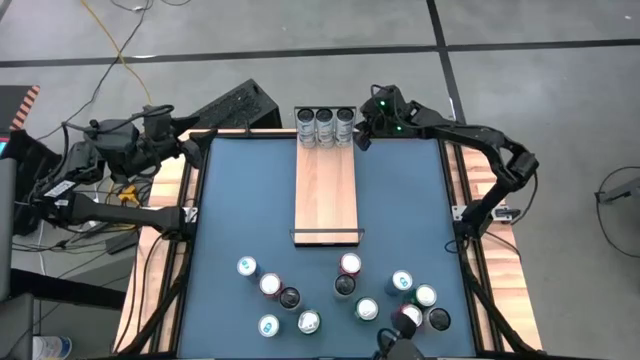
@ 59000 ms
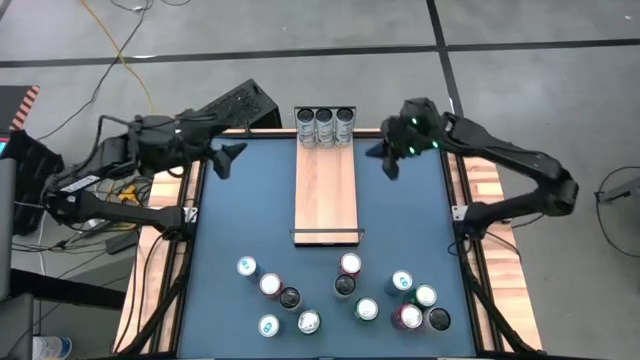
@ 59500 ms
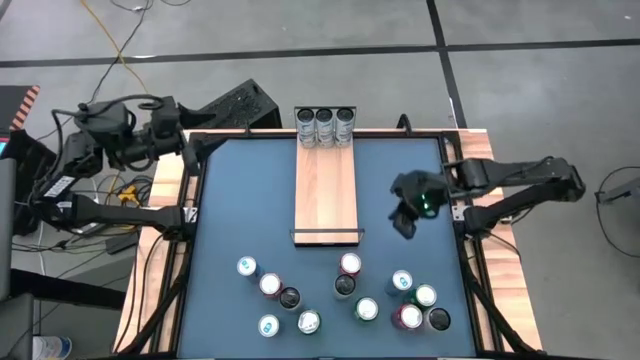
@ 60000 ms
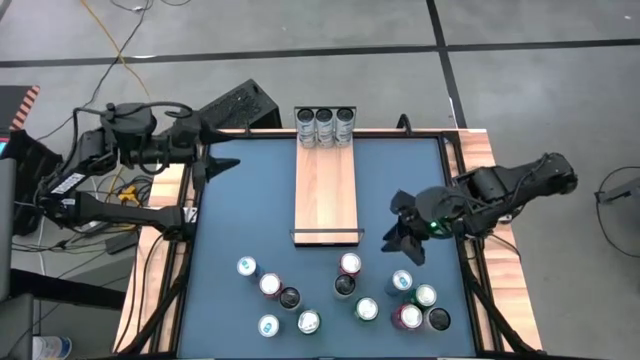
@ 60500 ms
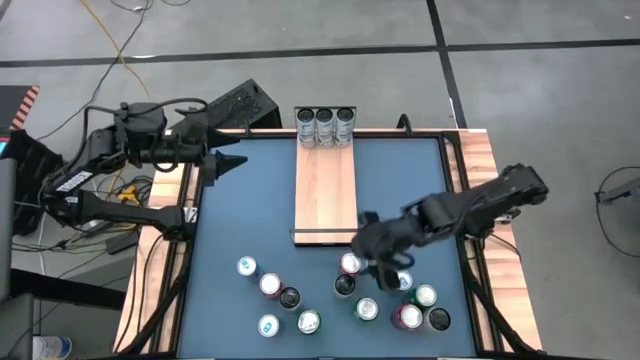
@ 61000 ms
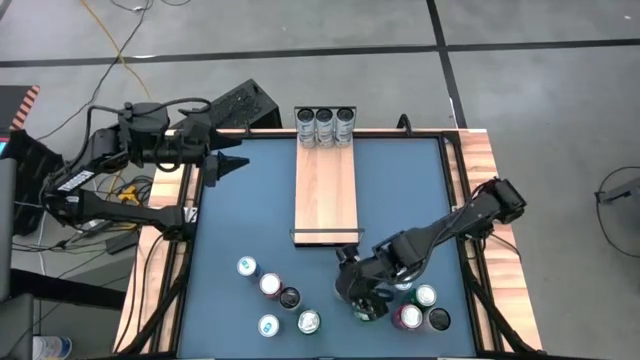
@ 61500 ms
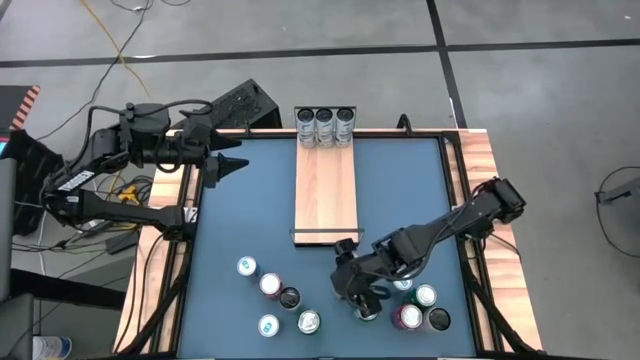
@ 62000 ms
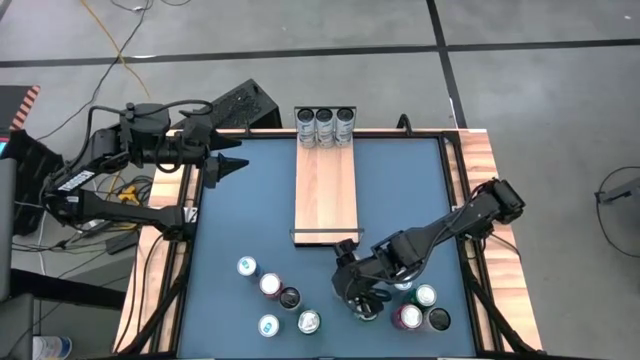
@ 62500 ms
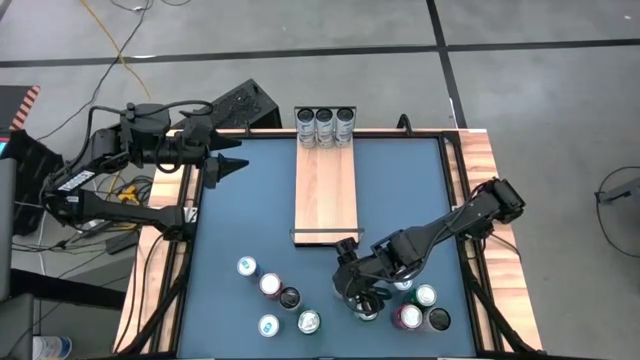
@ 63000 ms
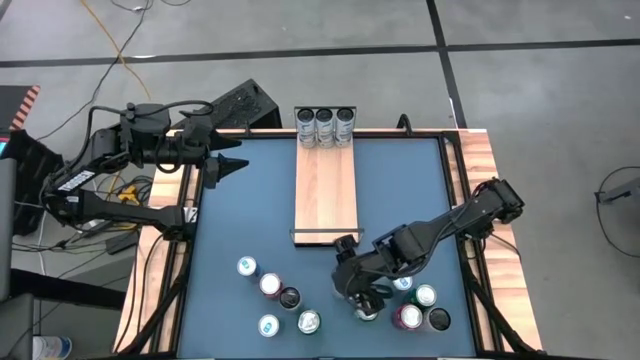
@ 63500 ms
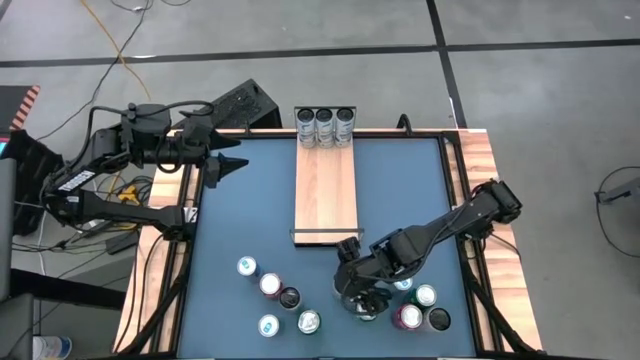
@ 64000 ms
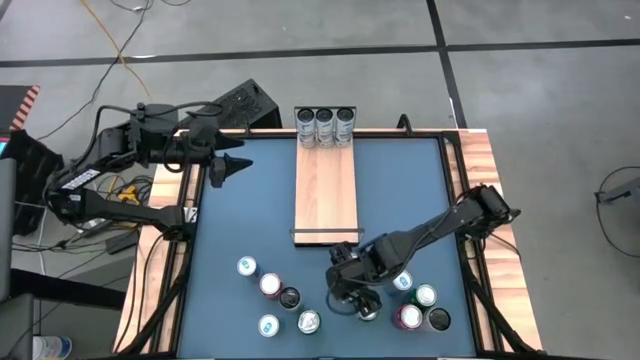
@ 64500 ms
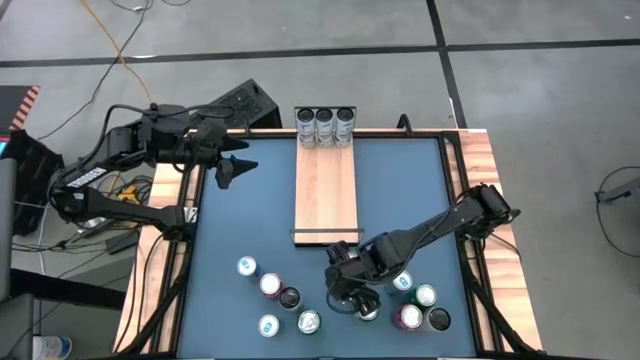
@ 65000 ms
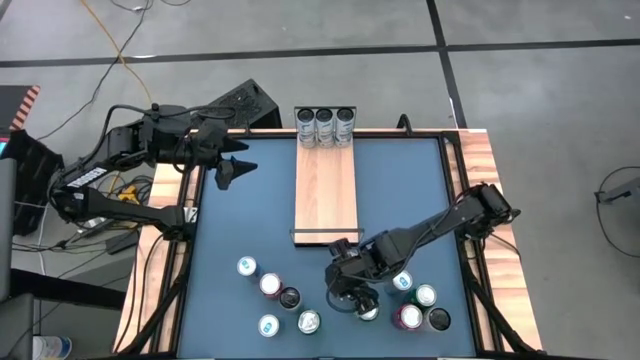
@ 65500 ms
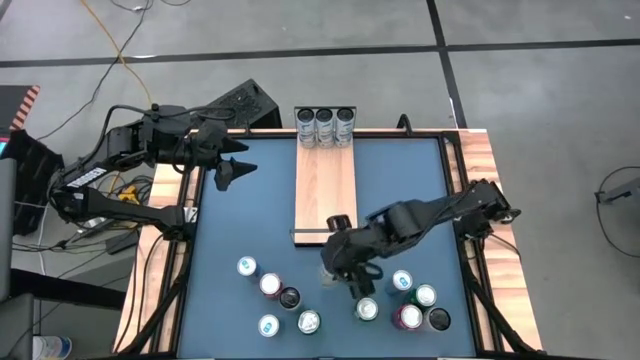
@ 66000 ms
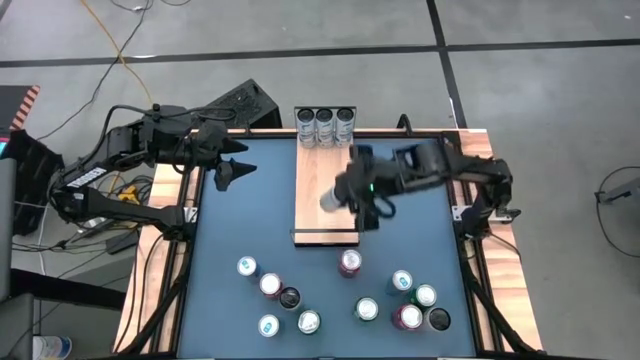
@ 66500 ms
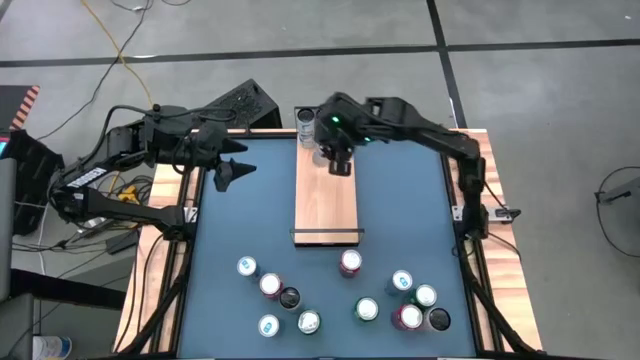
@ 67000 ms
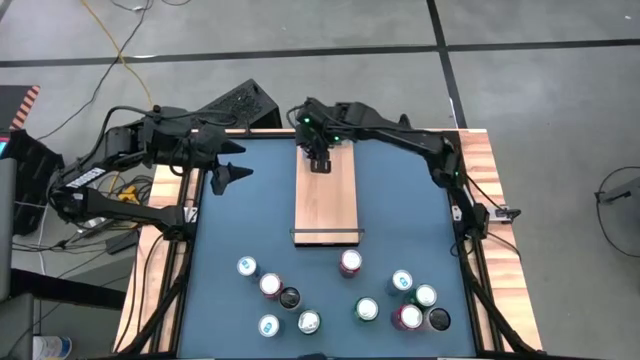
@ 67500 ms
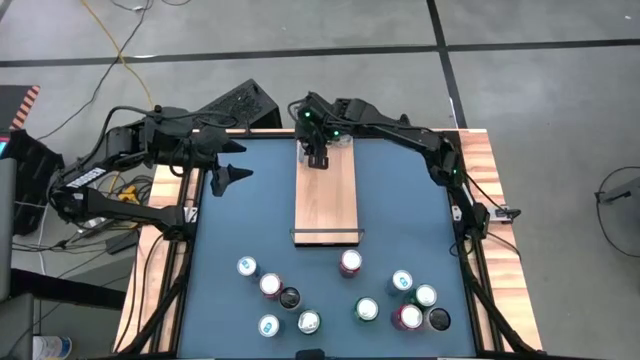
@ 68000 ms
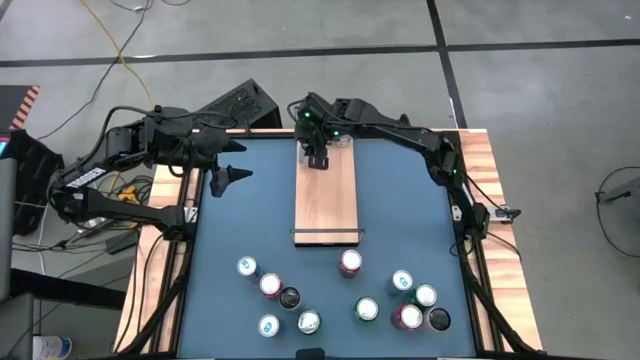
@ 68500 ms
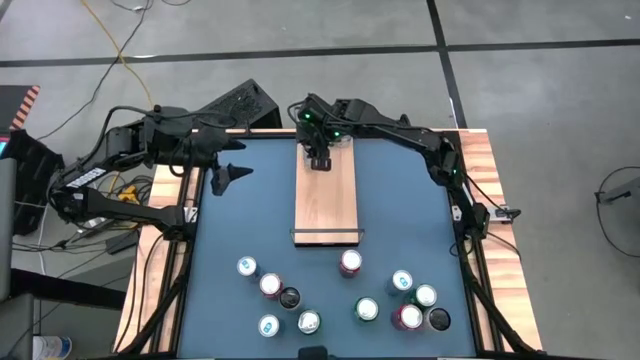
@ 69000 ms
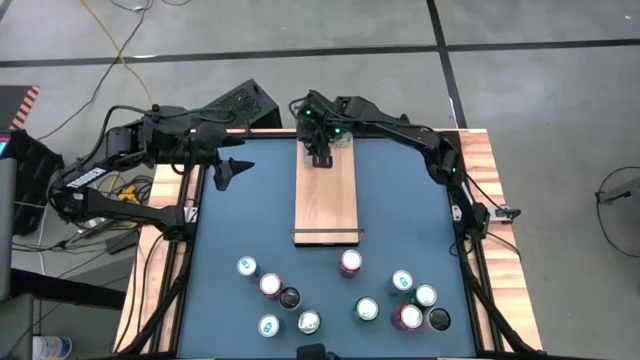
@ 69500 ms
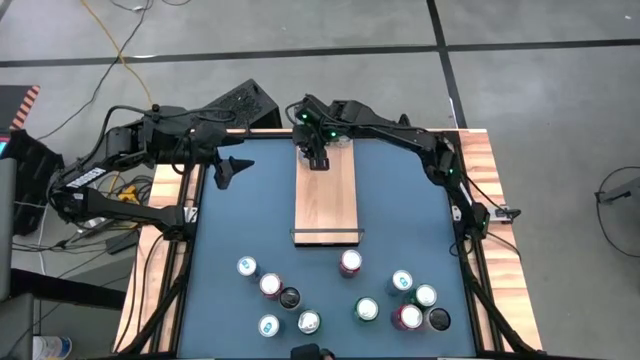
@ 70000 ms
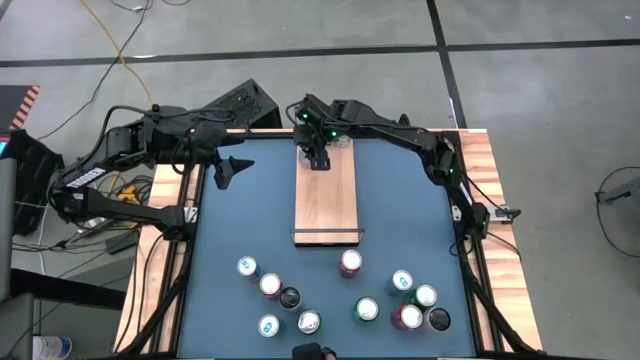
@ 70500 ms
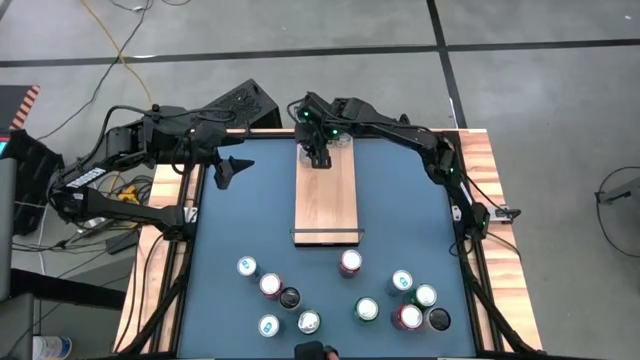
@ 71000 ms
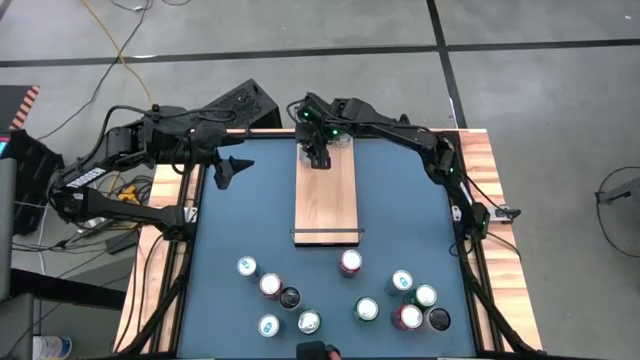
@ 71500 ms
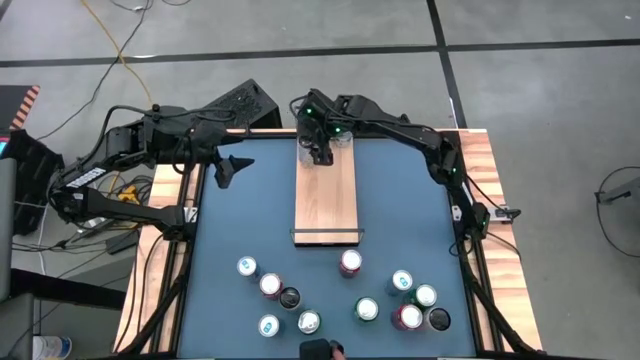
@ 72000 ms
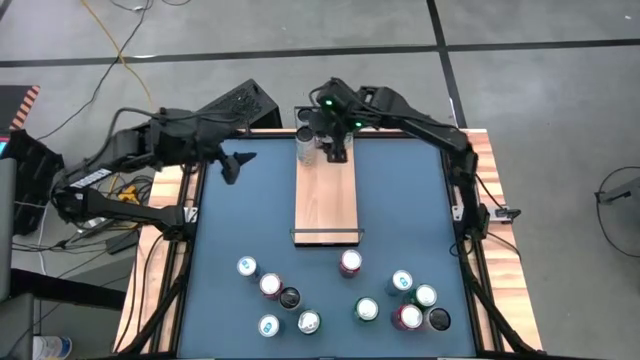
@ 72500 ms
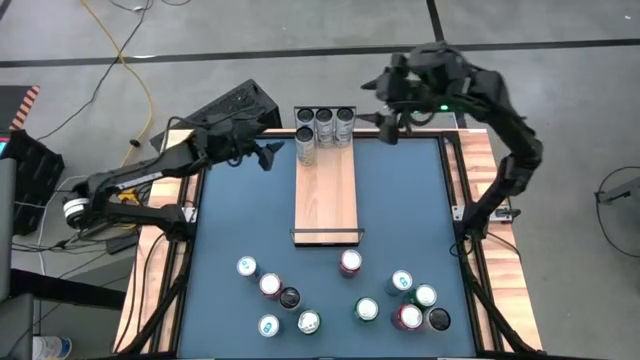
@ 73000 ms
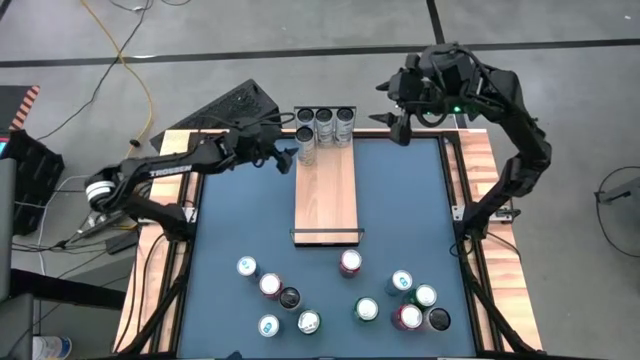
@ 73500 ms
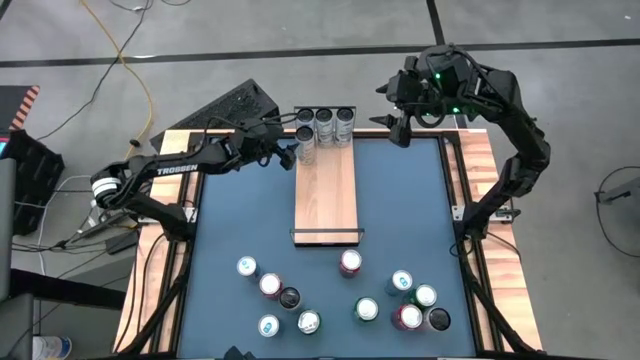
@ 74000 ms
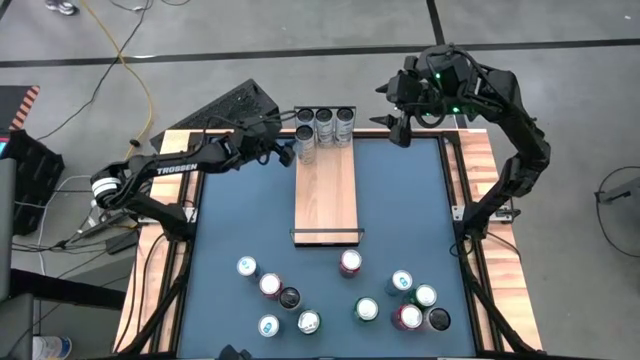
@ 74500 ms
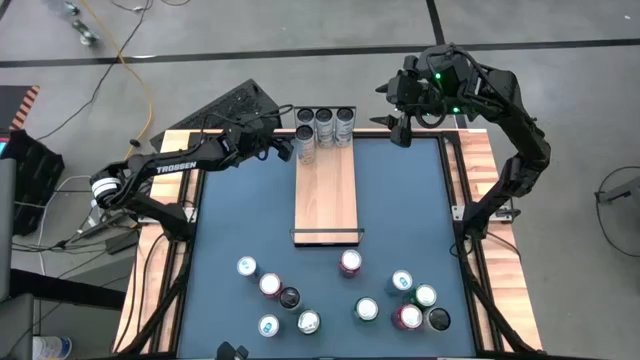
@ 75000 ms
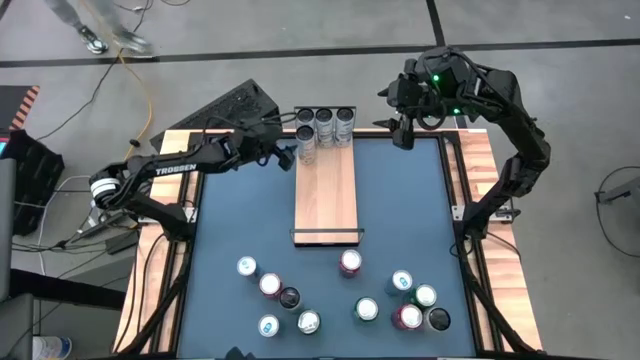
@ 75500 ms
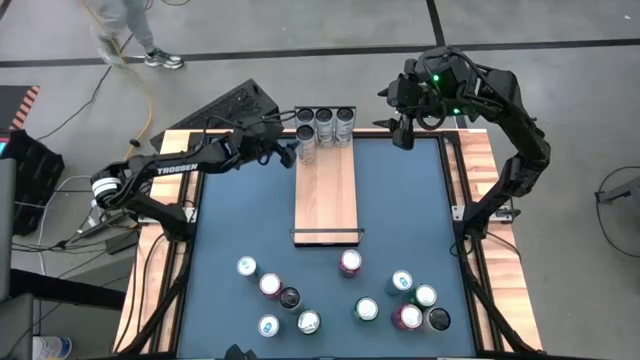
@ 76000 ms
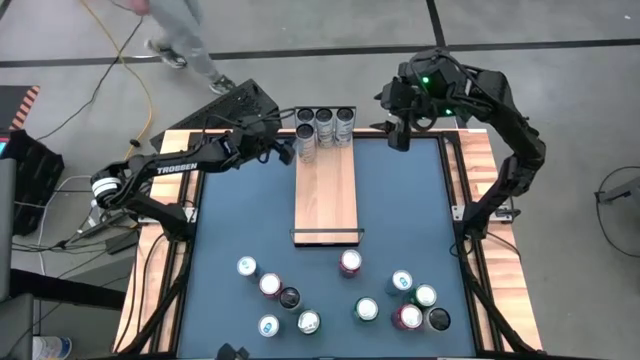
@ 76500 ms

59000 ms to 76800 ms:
Task: Place canned beverage on shelf
Put the center white yellow soda can on the shelf

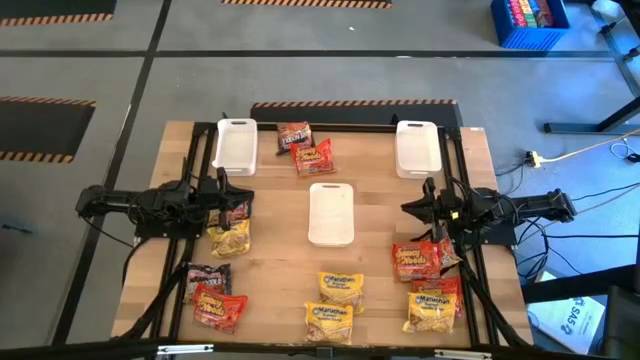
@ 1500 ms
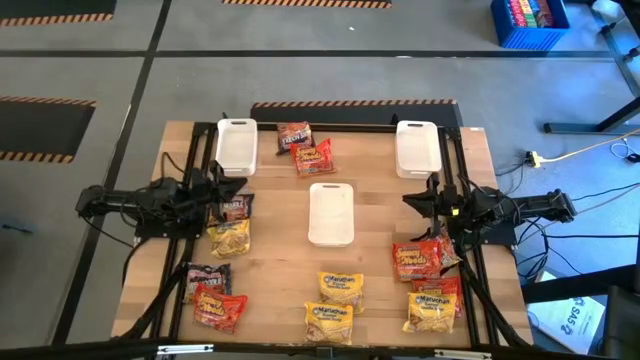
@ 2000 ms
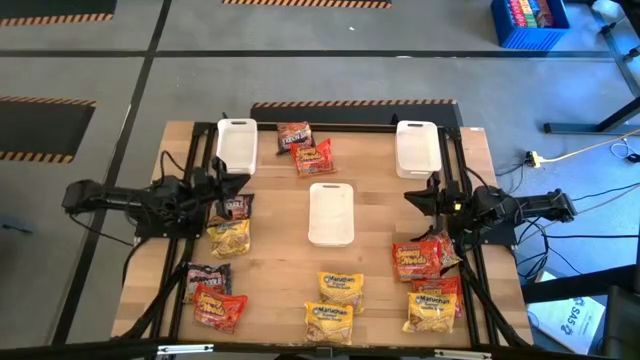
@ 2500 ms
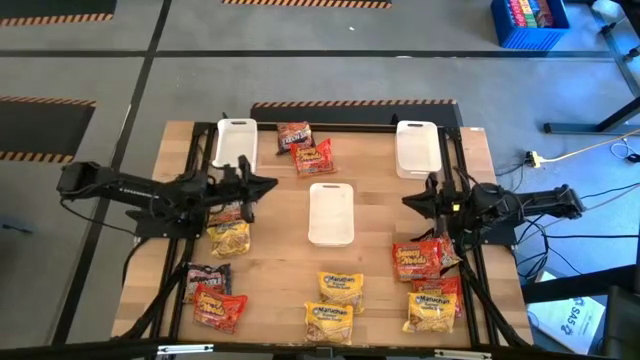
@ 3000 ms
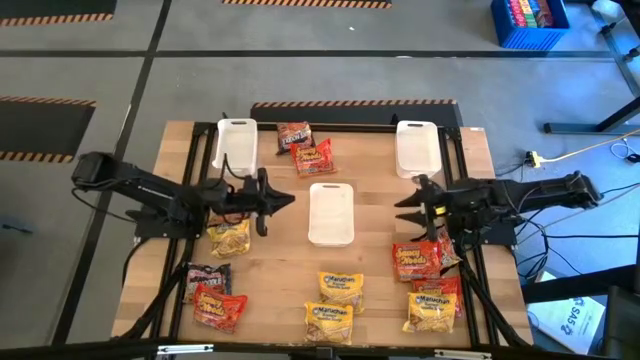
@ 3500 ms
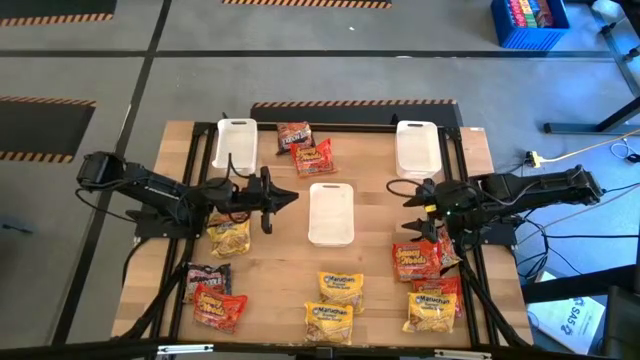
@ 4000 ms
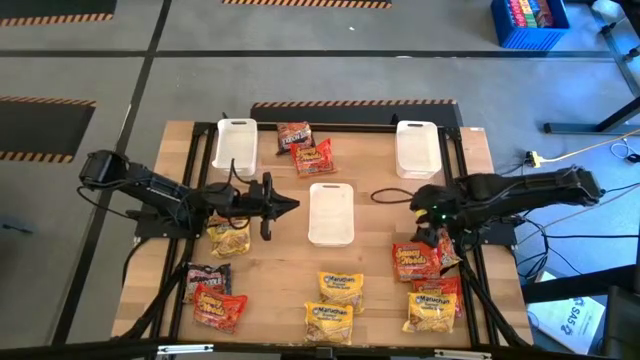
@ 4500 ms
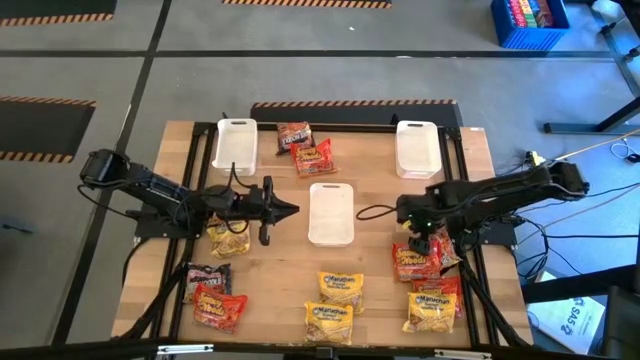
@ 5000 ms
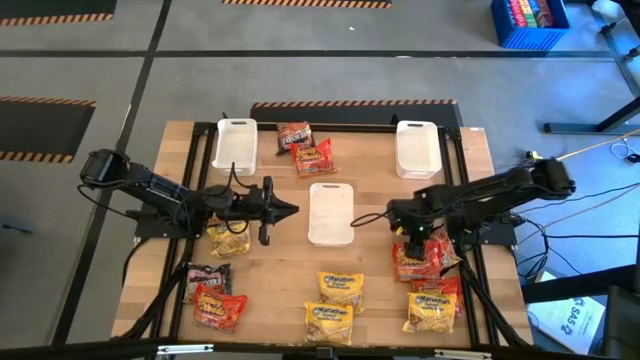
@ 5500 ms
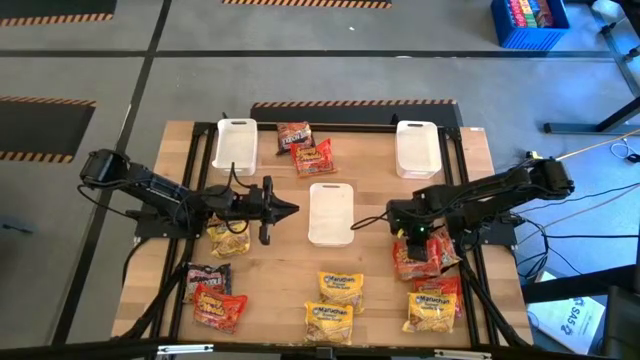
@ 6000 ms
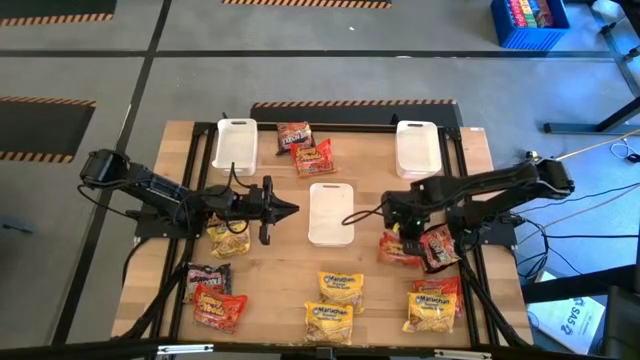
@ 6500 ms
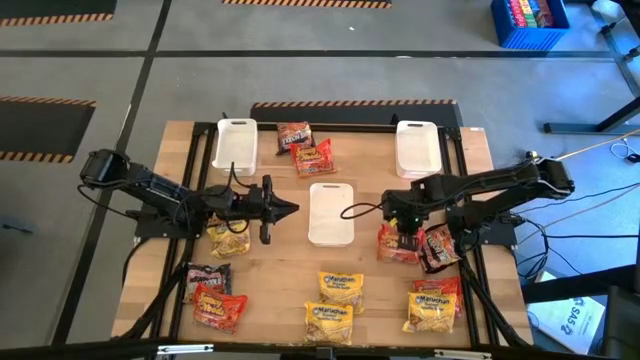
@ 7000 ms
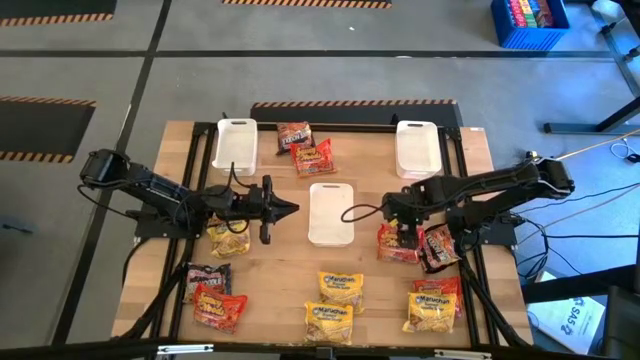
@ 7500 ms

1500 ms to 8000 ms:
Task: Sort Maruchan noodles
Put the orange noodle pack into the white right bin
